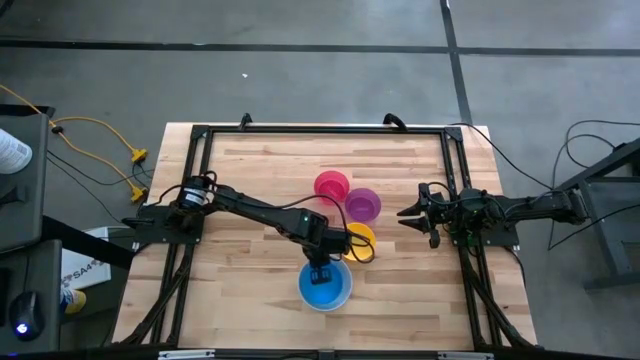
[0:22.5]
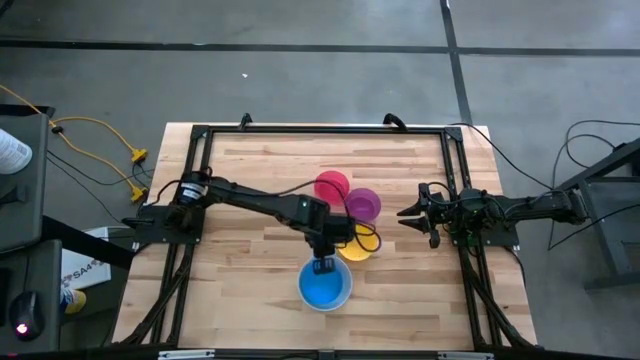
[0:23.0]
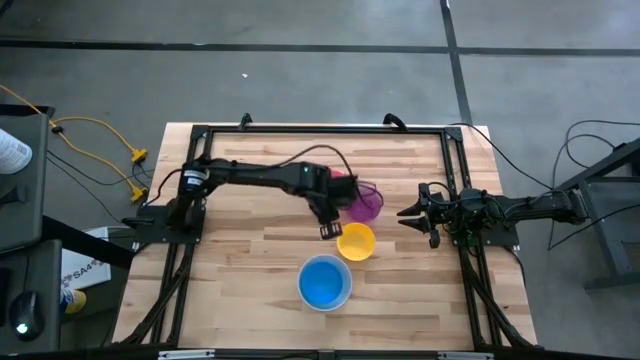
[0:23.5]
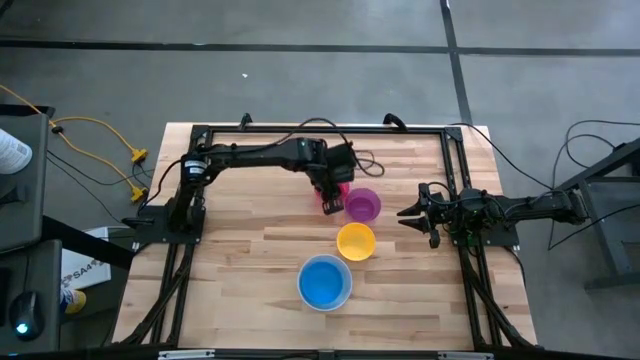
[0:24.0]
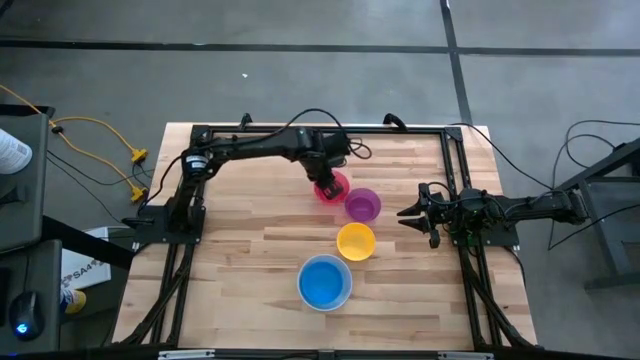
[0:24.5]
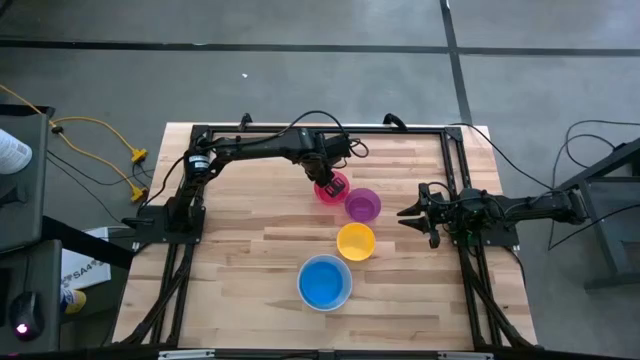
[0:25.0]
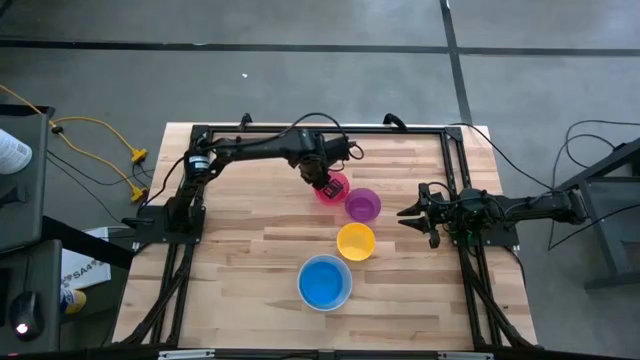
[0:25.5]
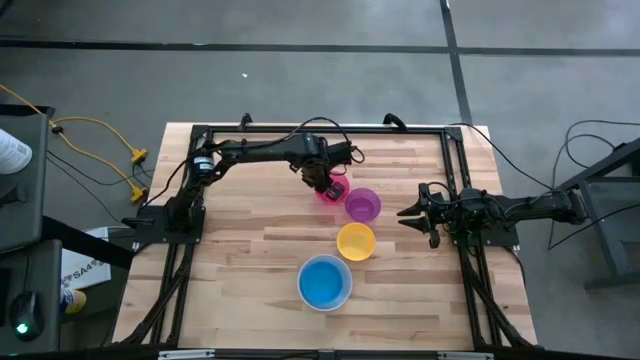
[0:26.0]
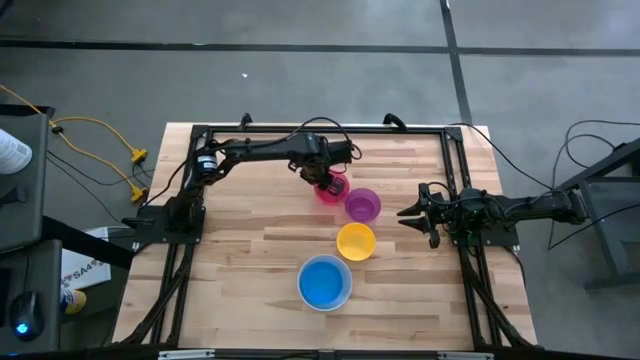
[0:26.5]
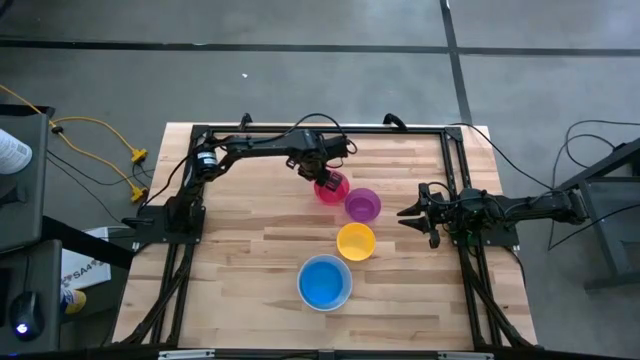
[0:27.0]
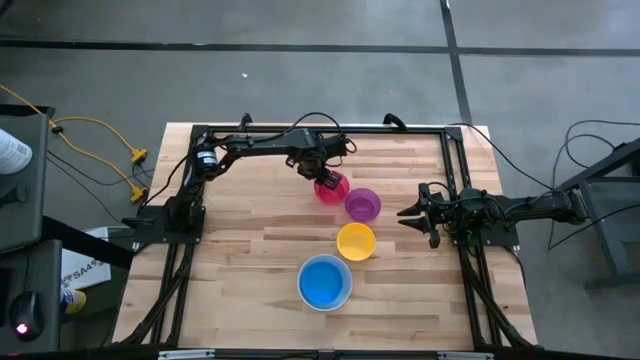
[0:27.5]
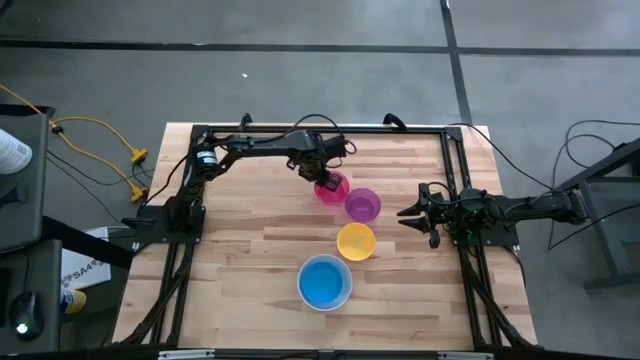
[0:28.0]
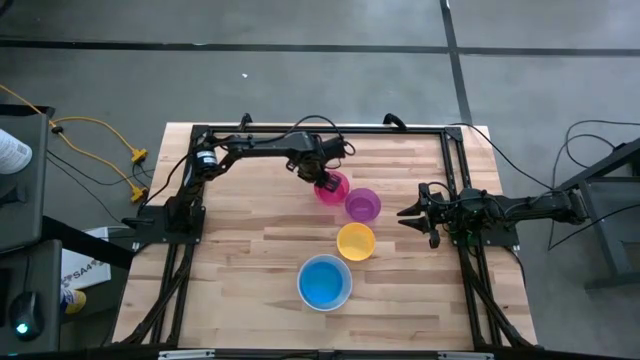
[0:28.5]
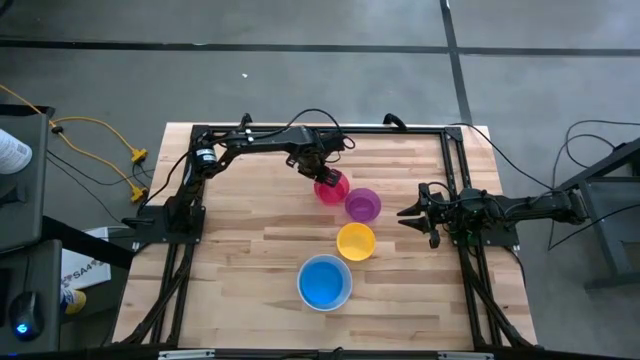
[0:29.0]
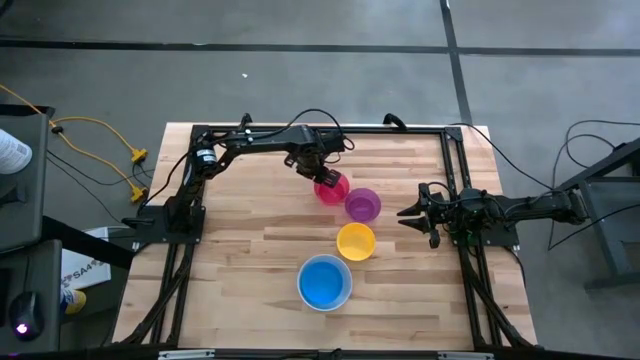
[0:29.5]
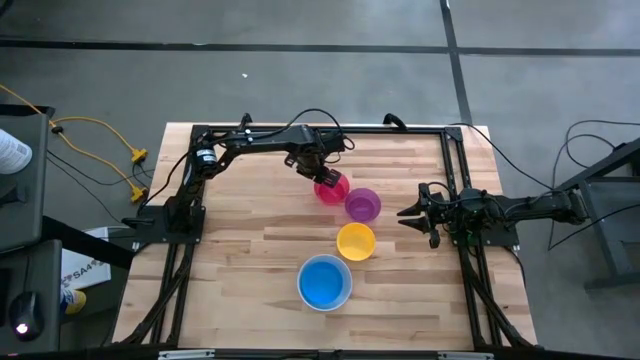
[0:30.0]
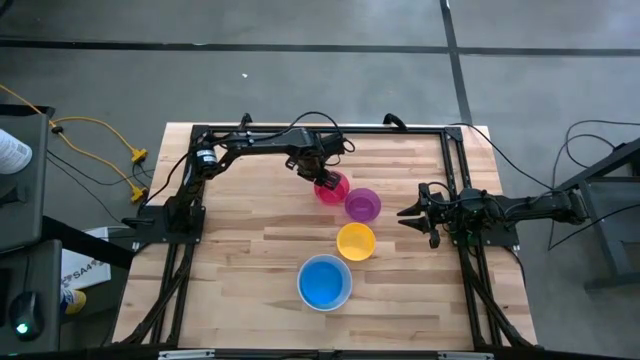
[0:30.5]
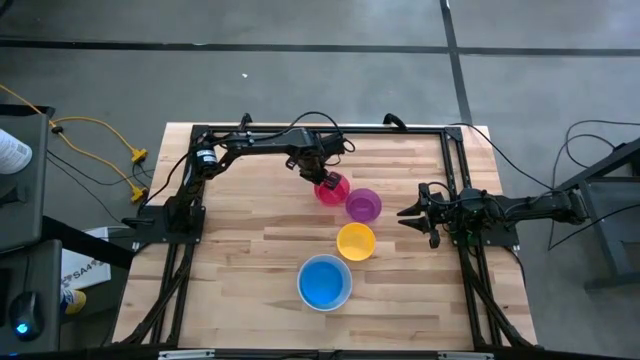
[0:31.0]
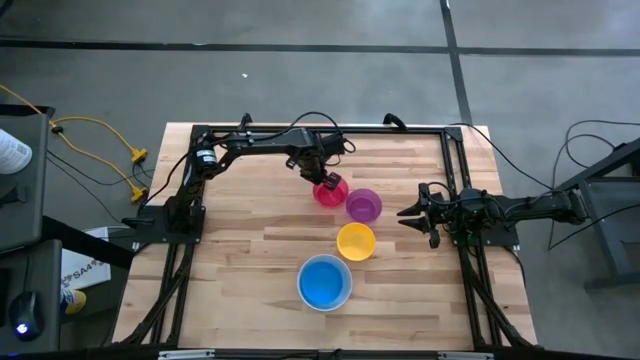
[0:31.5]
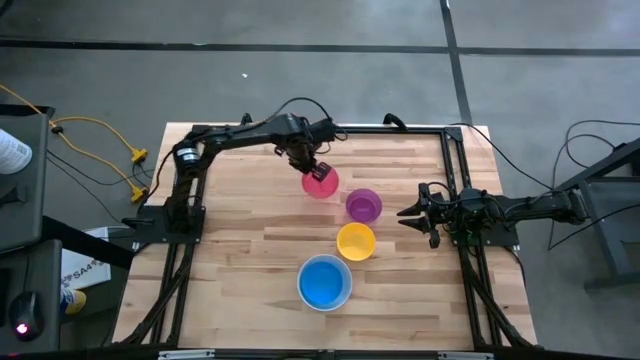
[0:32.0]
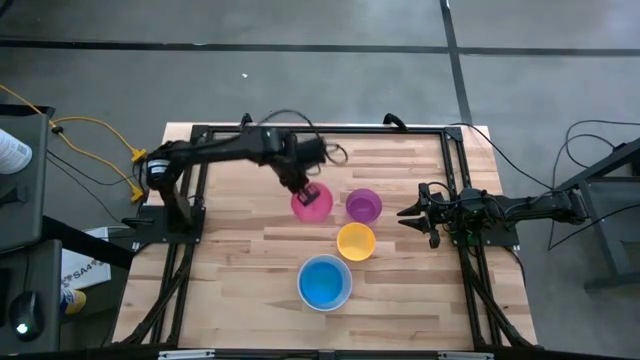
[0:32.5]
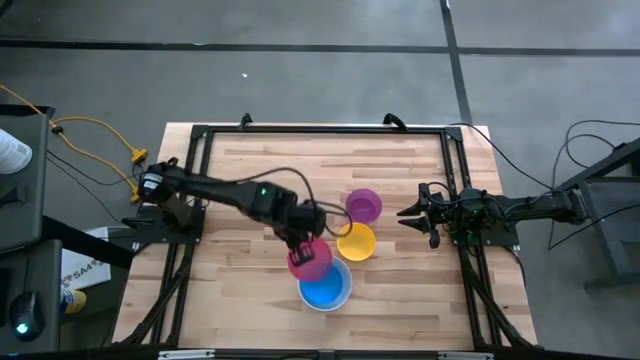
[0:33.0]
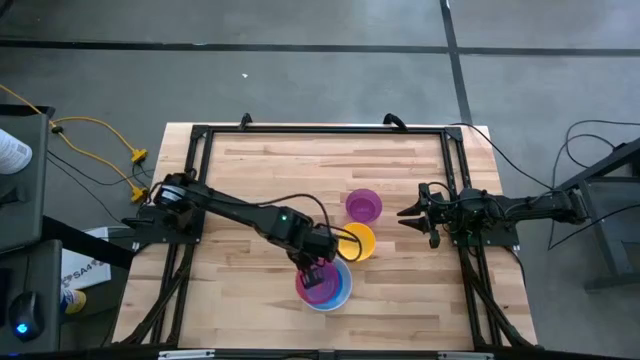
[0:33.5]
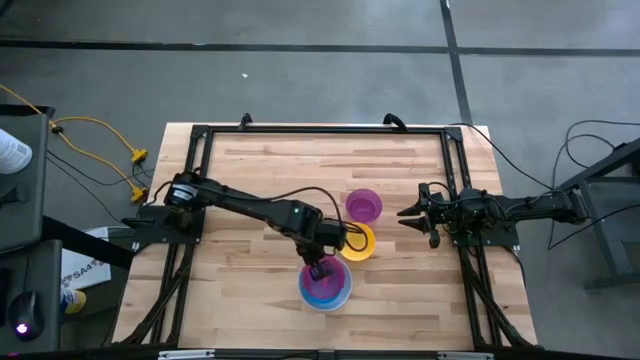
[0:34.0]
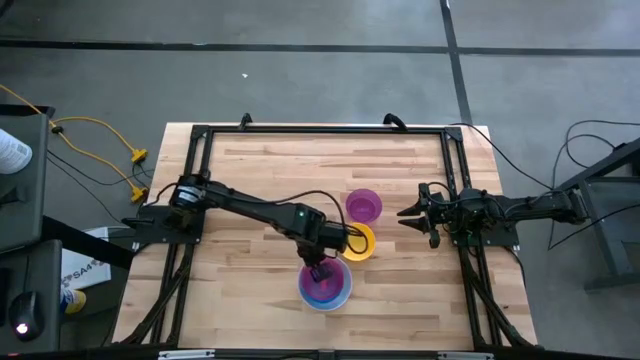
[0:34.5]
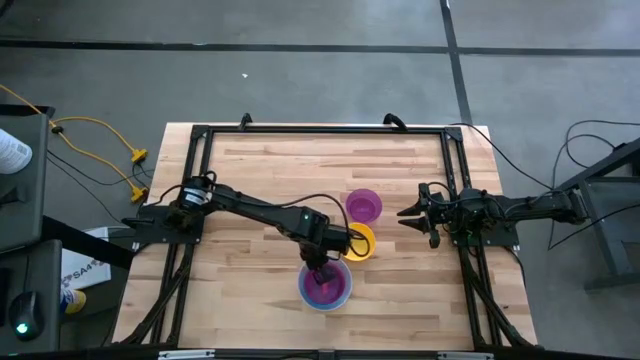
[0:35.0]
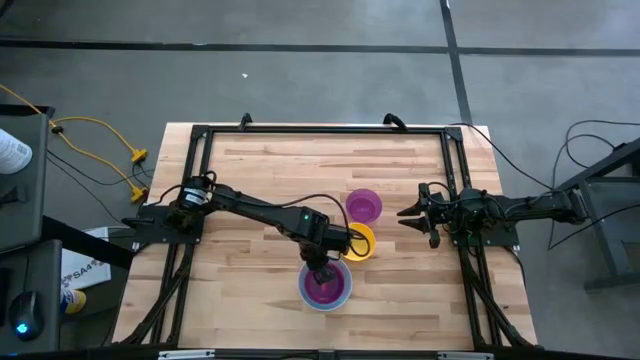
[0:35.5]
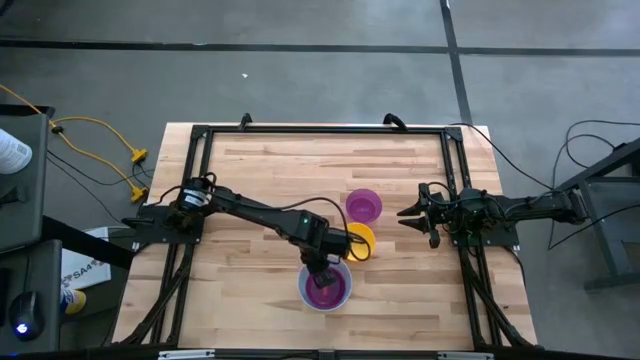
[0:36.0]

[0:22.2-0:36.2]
Stack the pink bowl on top of the blue bowl

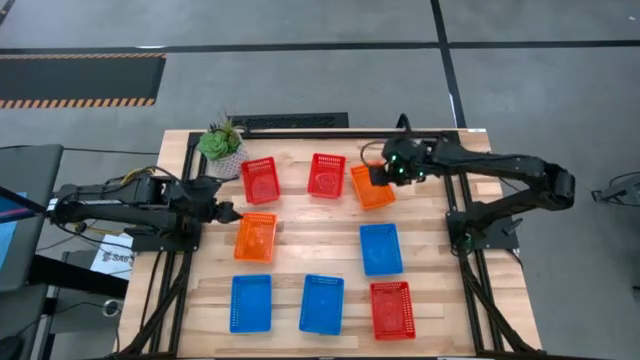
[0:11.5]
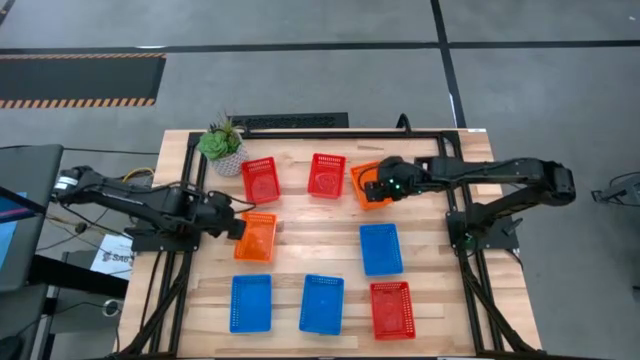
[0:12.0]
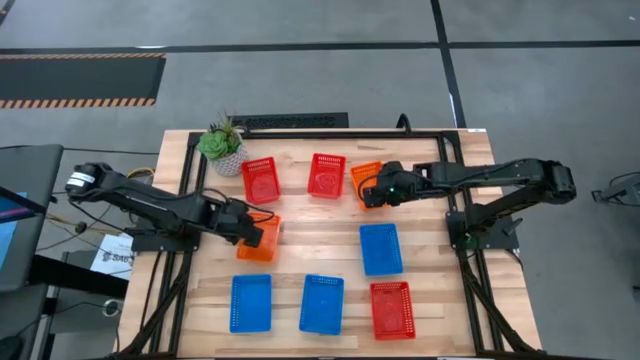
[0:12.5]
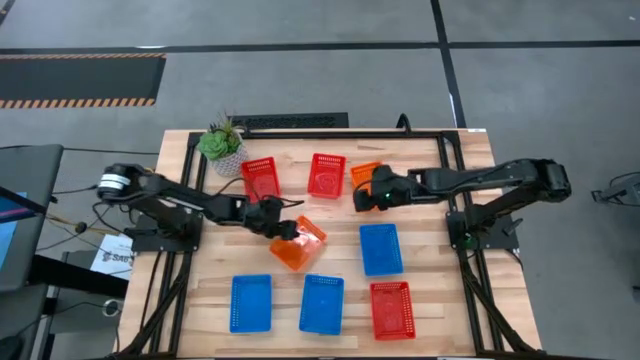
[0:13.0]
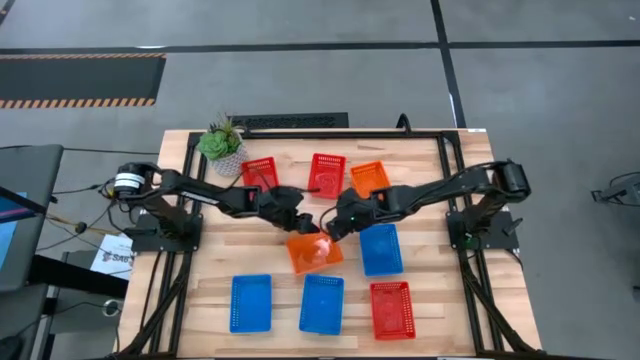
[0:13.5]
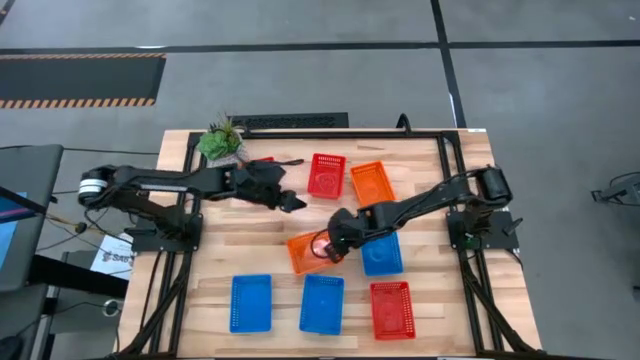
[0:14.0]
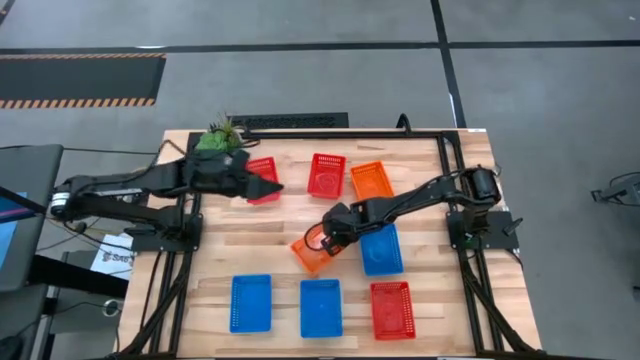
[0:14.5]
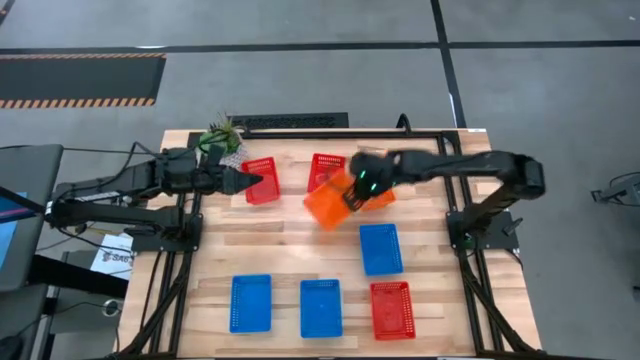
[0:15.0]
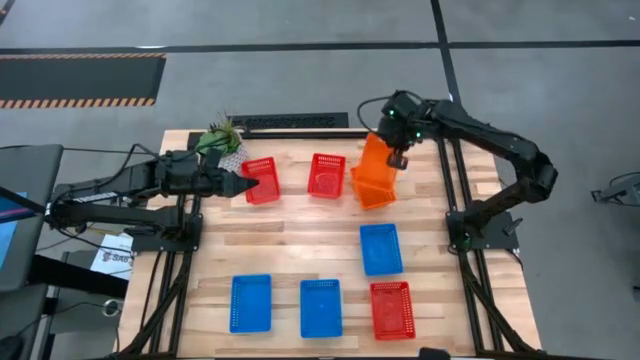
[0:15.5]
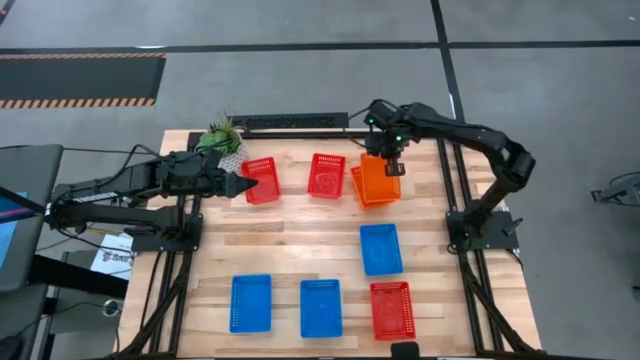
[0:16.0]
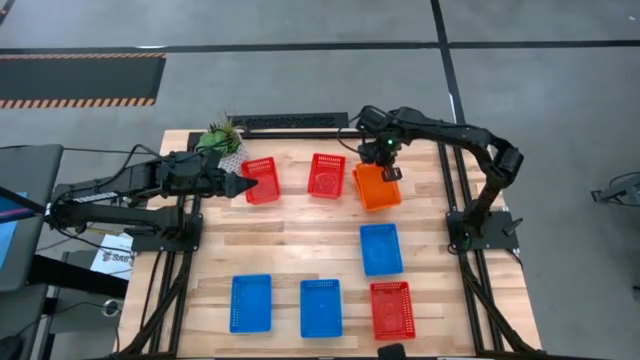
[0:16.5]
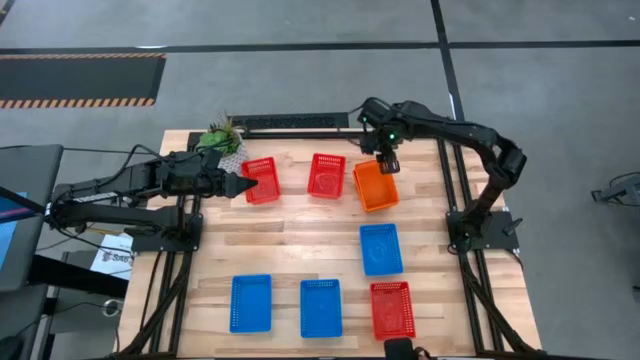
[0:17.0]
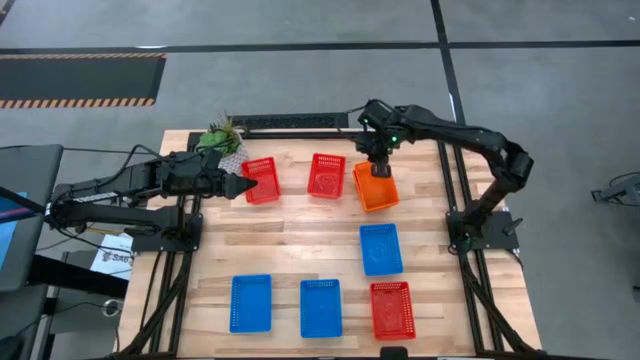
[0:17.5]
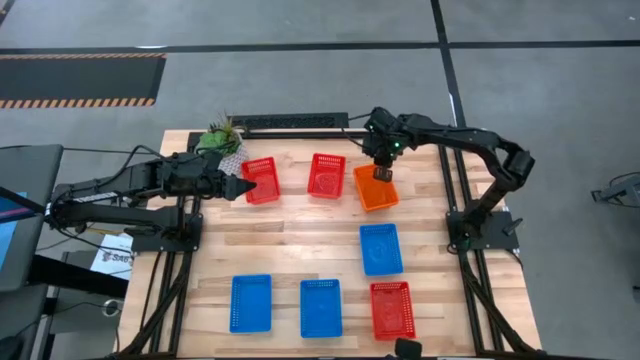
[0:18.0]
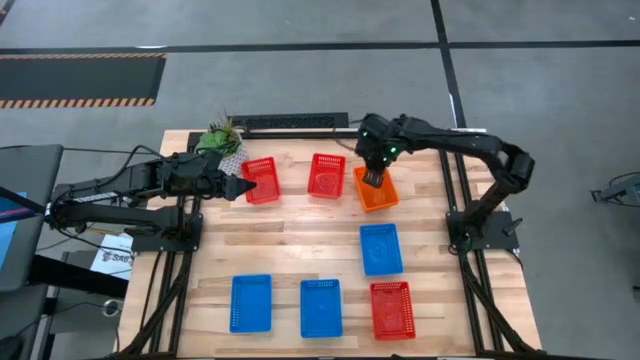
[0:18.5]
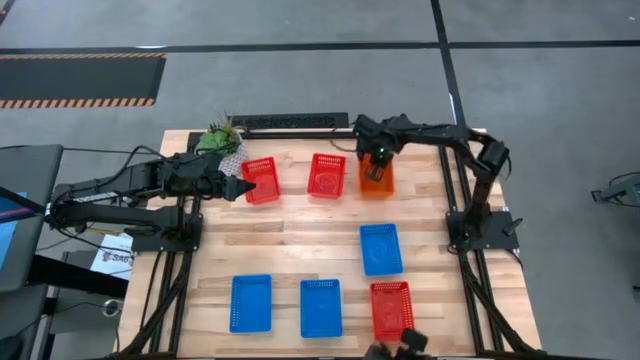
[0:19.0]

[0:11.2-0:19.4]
Stack the bottom orange bin on top of the top orange bin
